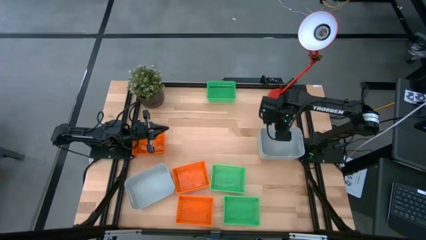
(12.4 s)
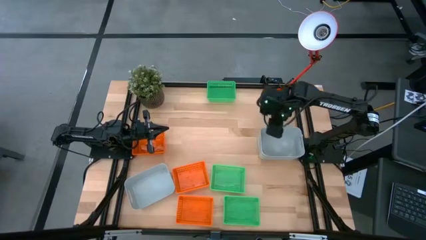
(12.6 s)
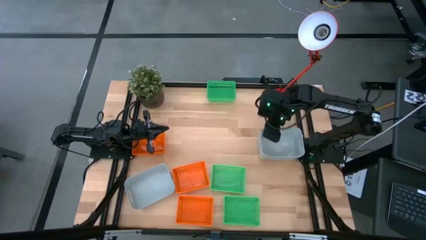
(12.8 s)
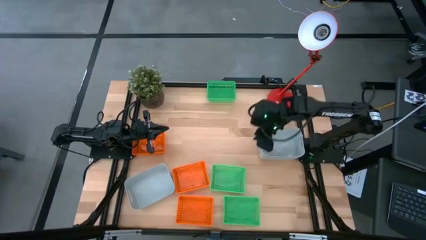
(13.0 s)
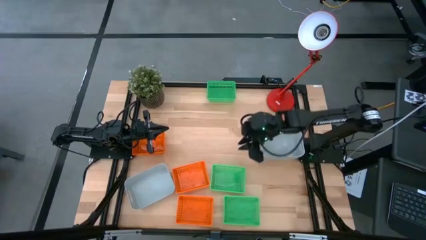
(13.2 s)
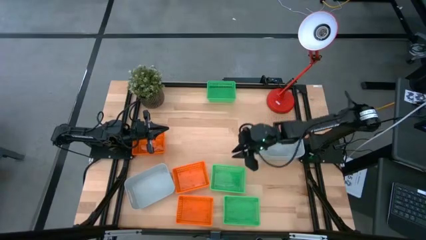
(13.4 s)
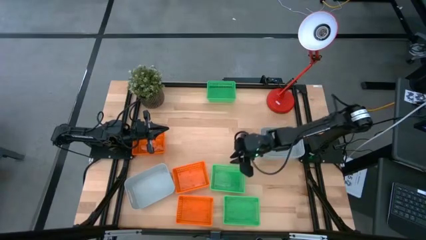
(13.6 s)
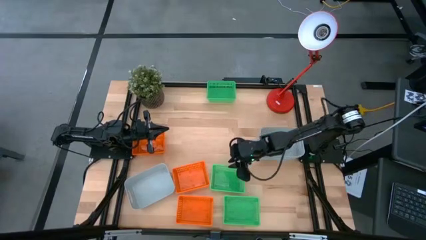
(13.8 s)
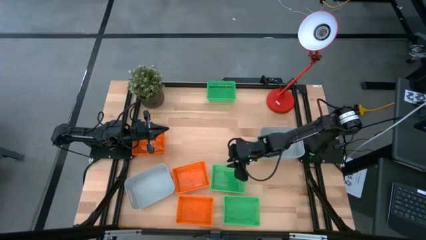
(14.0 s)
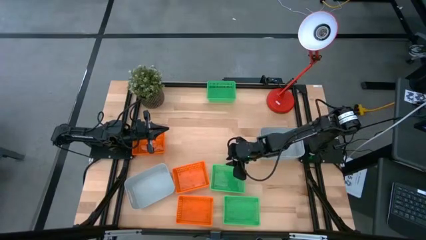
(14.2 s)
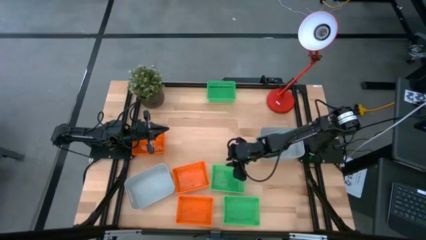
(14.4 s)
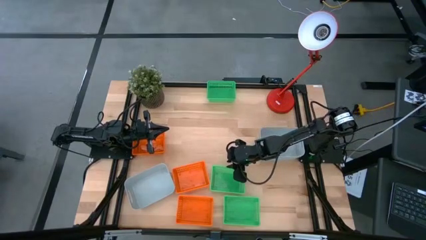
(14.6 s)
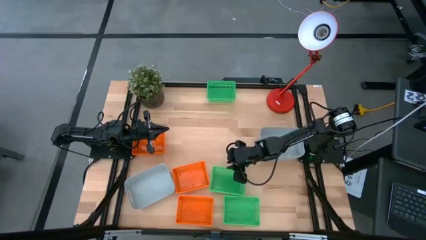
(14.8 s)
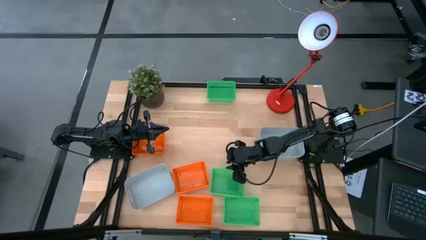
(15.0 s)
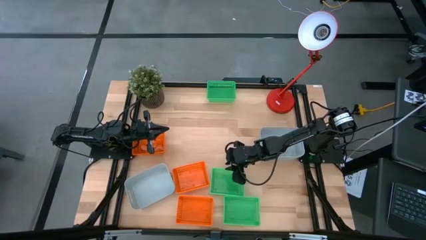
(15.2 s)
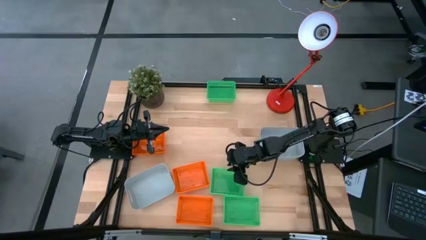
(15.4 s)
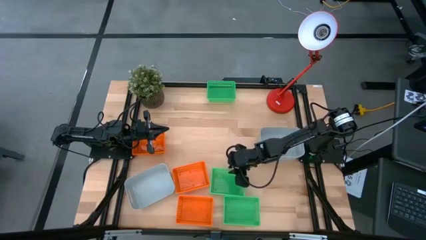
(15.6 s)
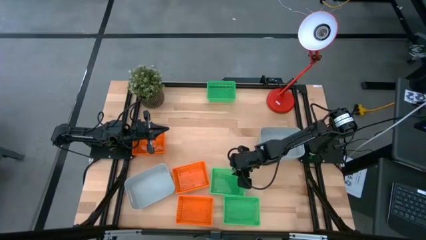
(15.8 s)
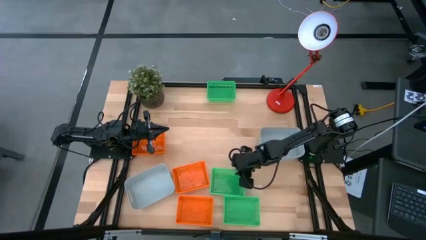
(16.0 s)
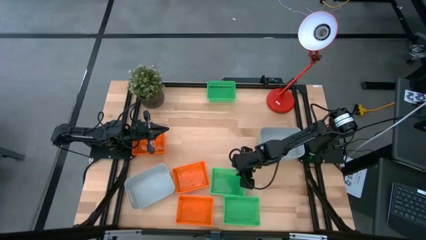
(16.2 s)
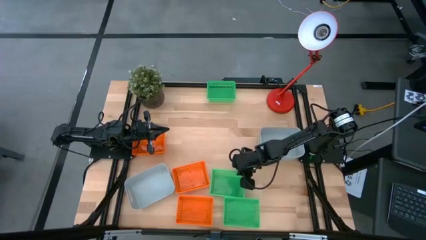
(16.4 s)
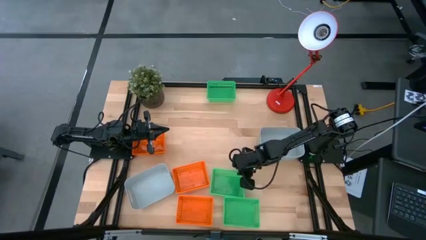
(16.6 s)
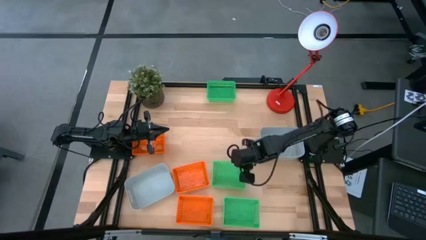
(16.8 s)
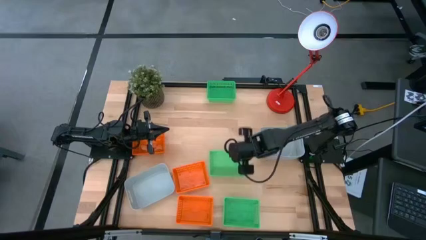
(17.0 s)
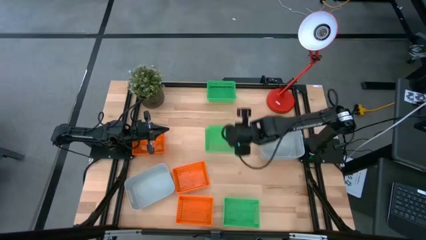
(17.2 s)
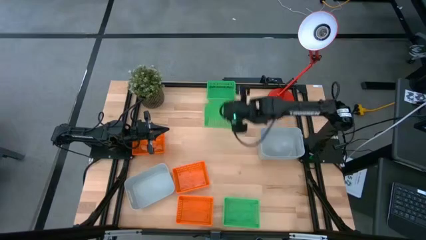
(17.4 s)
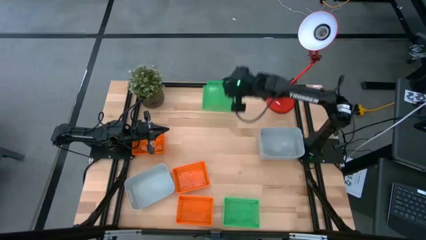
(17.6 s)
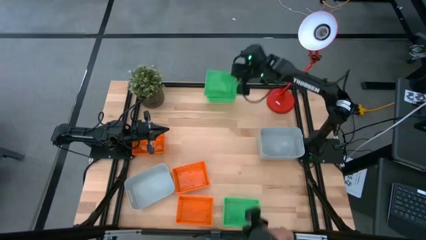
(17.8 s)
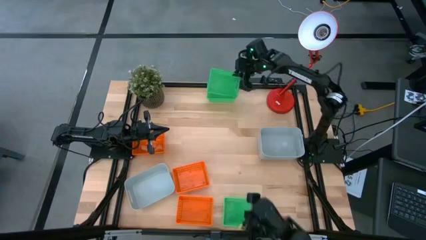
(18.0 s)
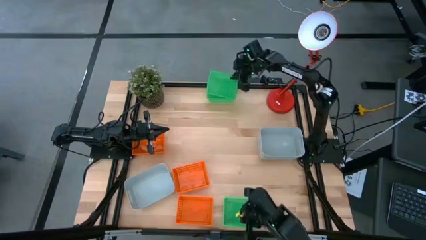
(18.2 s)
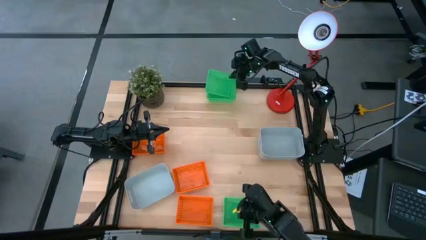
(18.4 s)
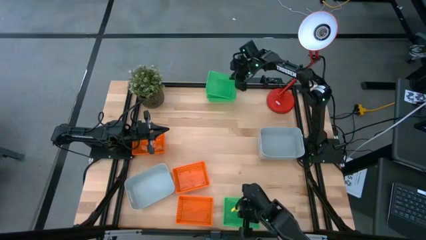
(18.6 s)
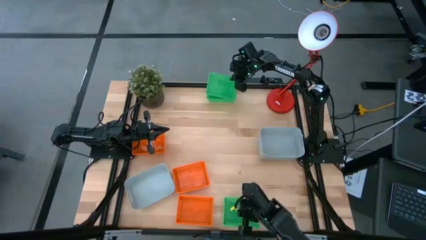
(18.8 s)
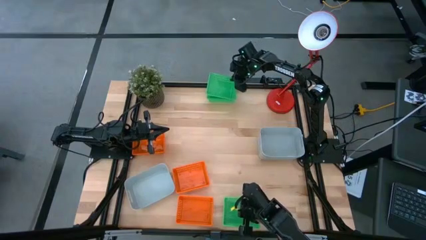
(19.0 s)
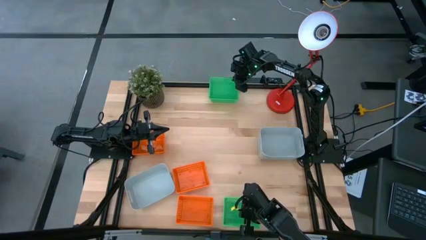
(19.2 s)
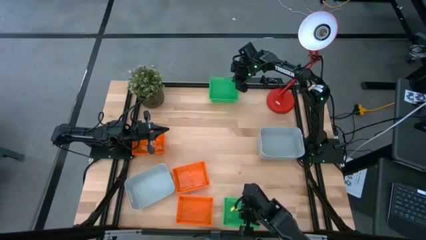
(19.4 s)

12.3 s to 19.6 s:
Stack the center green bin onto the top center green bin

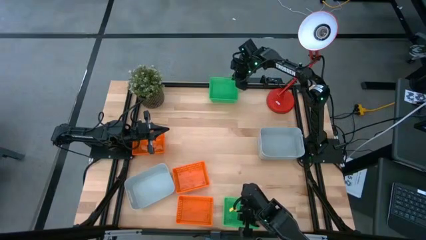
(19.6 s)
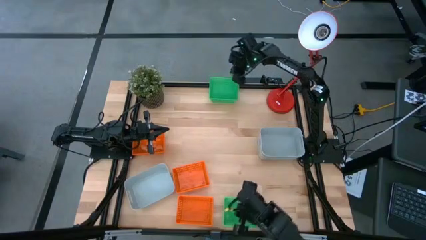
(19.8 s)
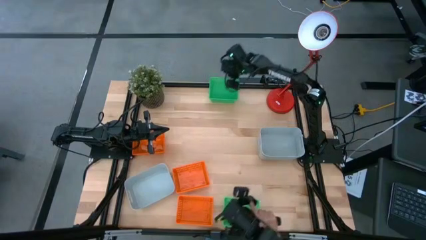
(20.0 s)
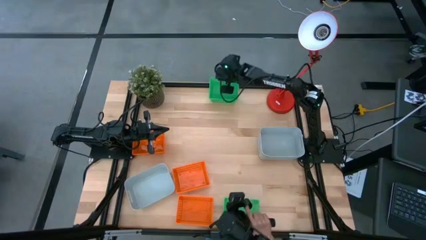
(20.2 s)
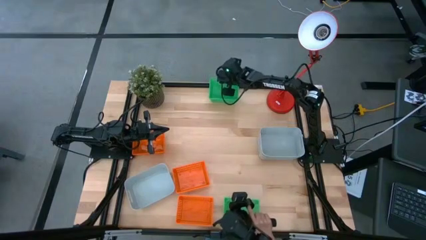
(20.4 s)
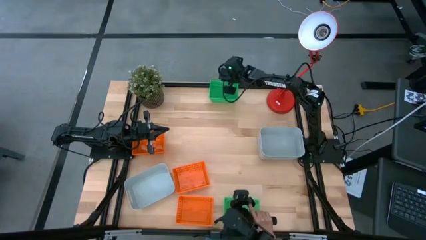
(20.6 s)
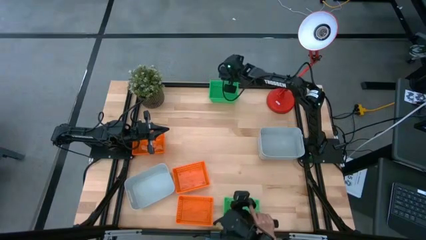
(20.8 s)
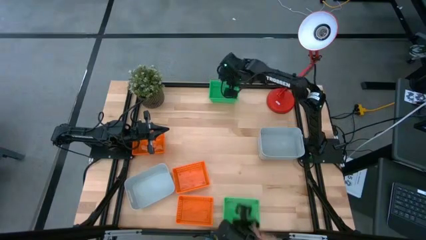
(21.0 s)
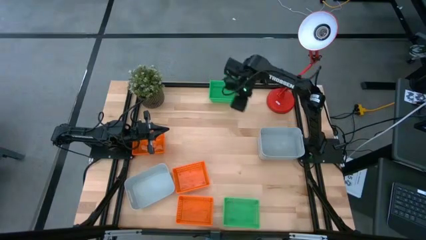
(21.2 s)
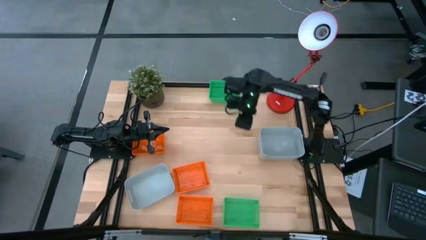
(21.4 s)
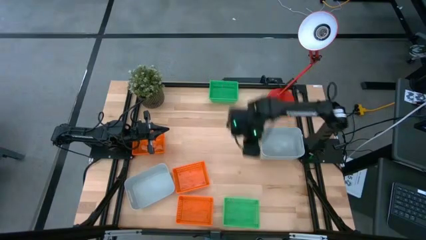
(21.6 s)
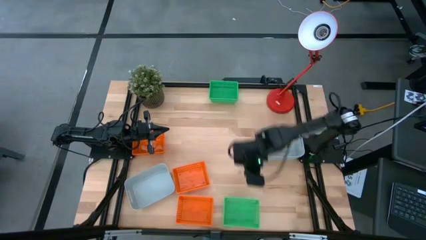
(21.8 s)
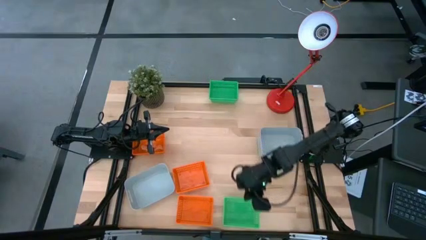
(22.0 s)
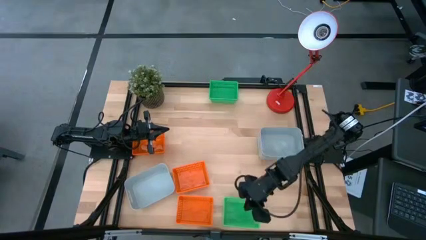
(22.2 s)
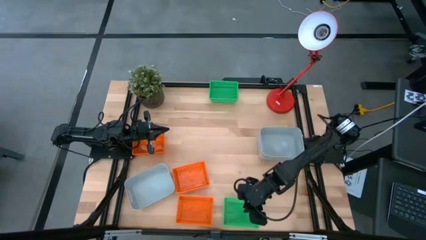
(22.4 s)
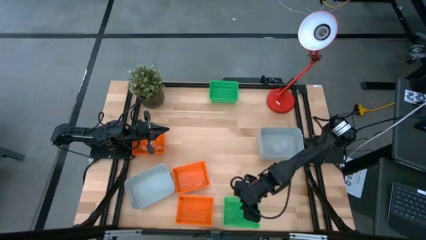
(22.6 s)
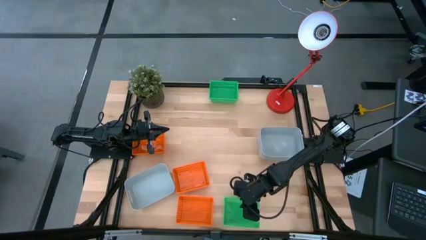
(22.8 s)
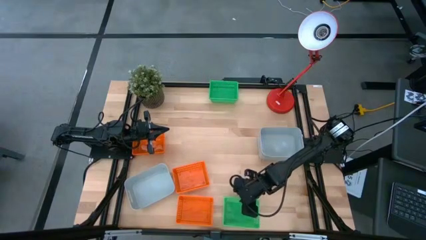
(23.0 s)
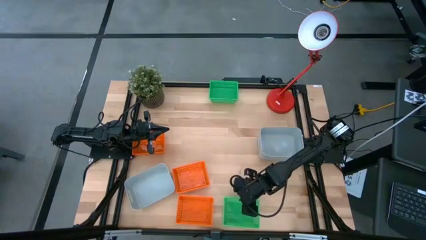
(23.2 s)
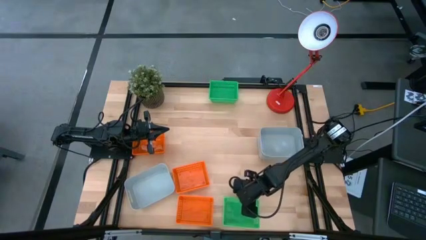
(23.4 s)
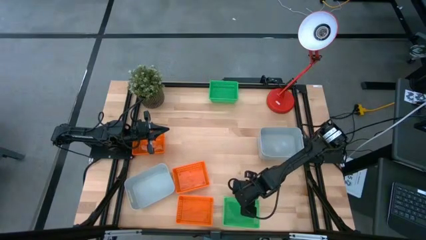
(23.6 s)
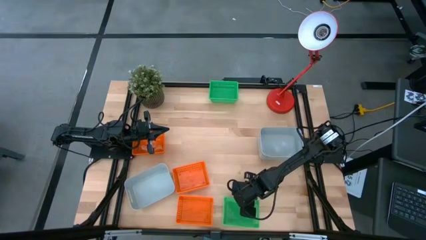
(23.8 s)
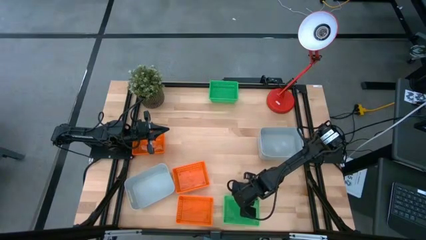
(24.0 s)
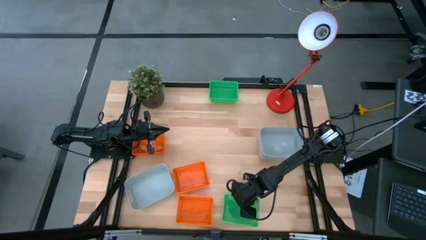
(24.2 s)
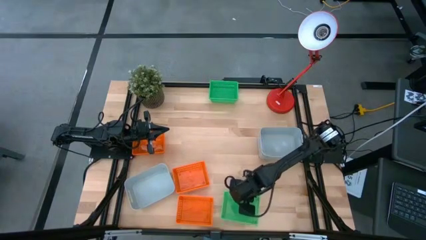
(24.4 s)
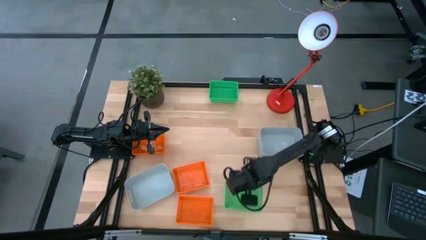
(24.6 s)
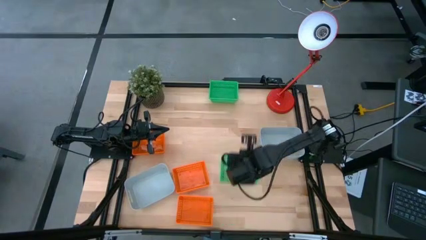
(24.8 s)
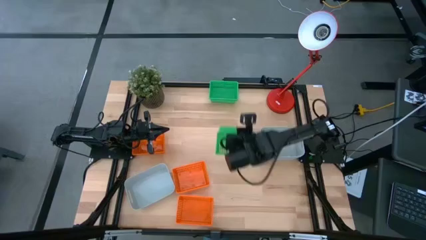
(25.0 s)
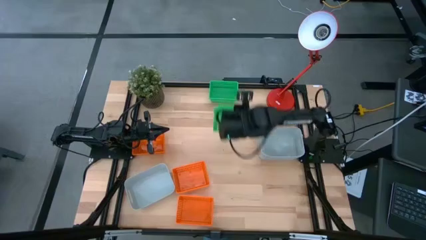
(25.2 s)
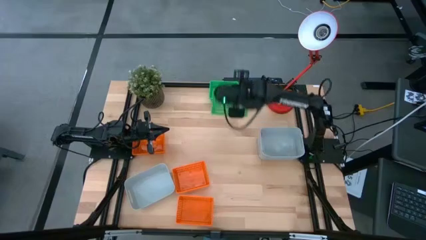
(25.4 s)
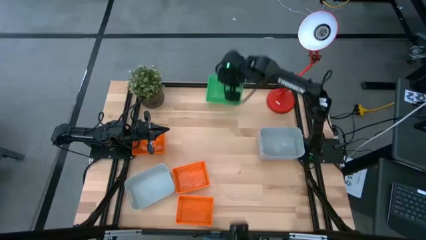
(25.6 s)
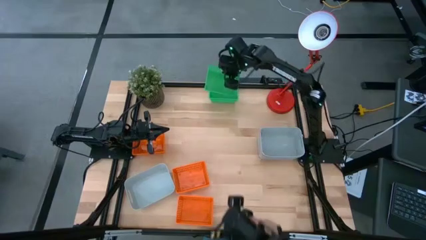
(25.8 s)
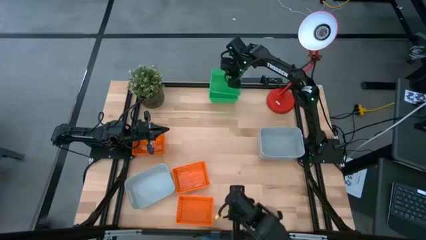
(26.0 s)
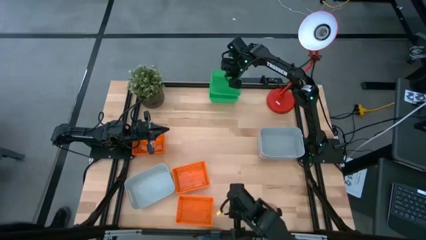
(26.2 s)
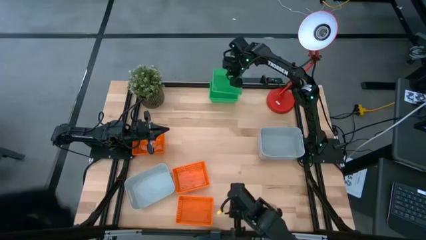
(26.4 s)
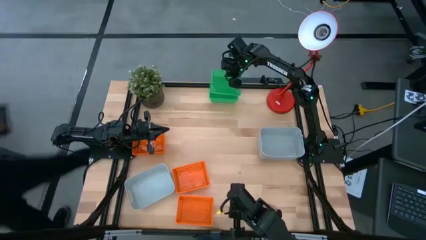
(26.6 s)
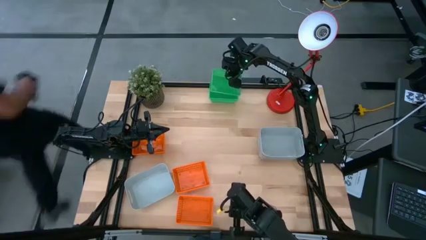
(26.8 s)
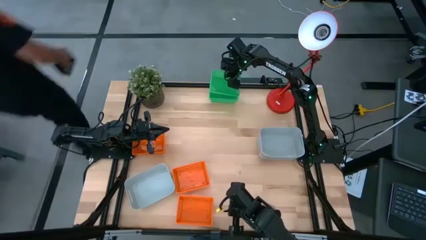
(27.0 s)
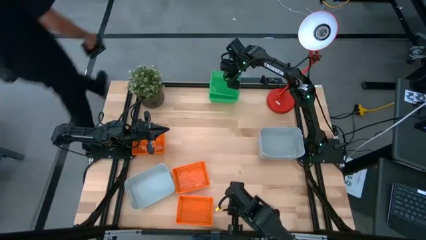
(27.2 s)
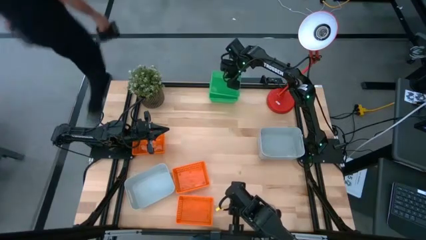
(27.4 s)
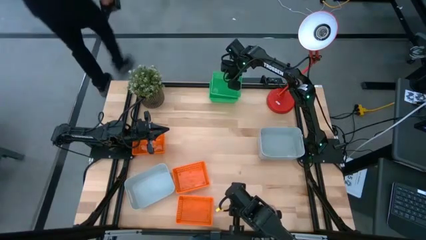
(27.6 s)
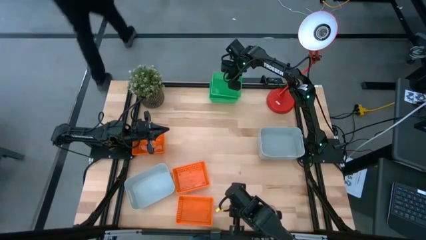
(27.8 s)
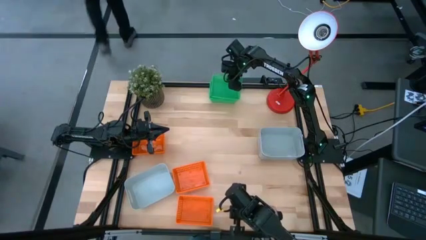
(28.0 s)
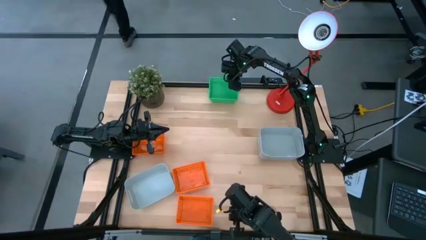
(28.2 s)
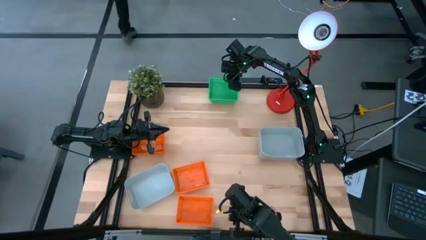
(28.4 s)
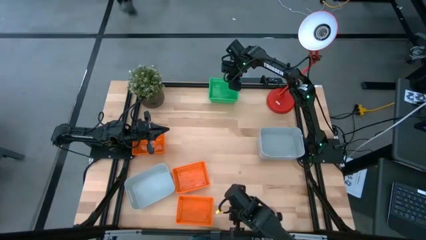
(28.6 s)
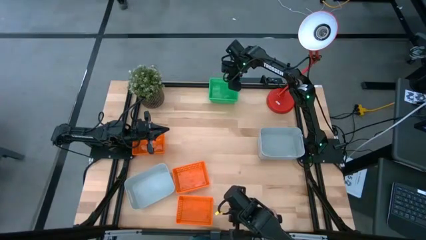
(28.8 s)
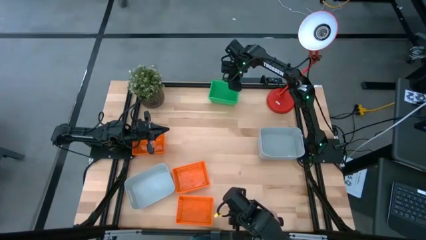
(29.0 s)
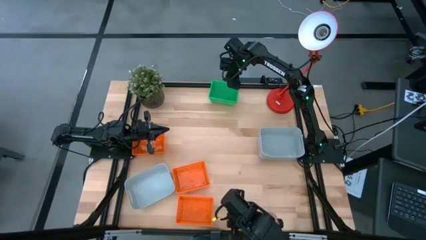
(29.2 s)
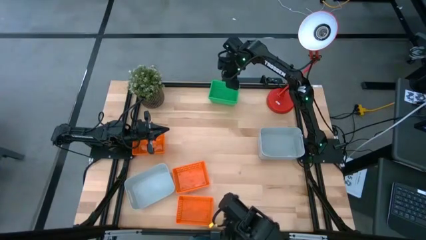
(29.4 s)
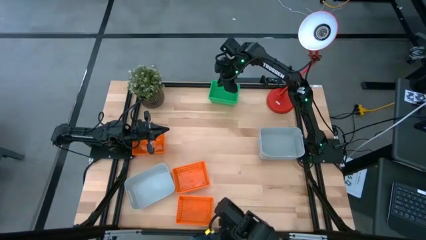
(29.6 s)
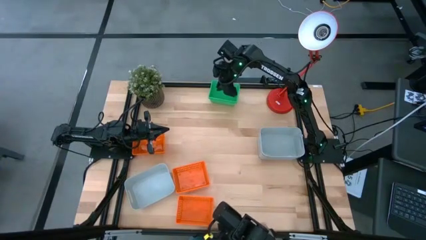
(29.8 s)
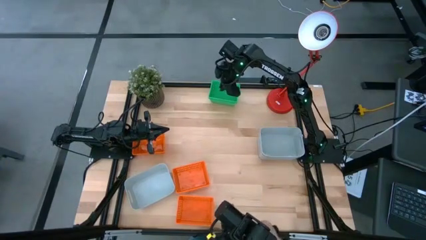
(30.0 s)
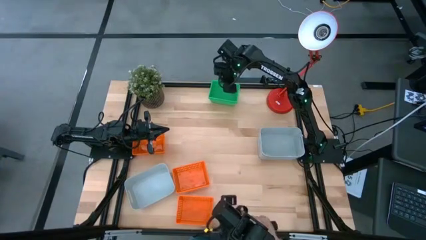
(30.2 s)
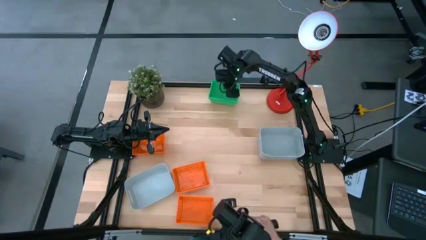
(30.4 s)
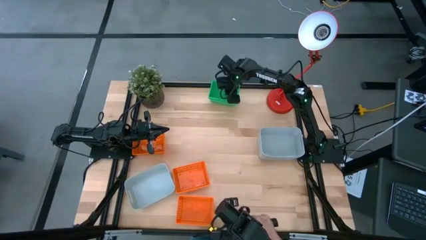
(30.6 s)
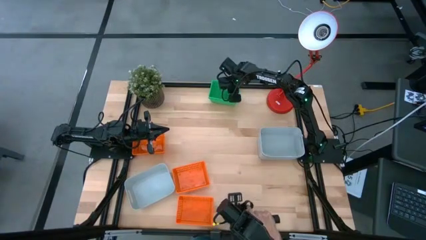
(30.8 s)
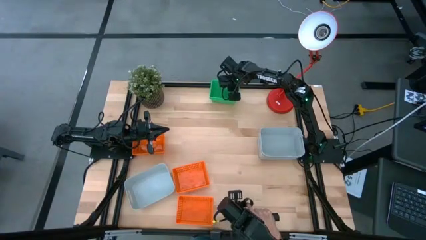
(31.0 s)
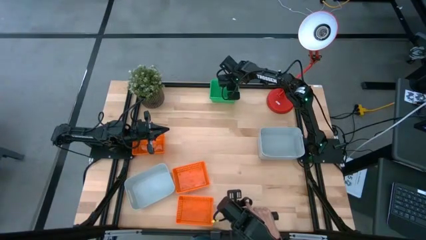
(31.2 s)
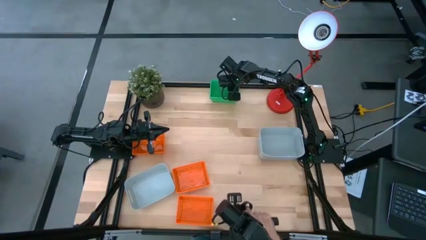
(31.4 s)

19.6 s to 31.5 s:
Stack the bottom green bin onto the other green bins
